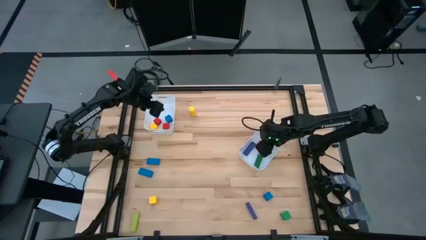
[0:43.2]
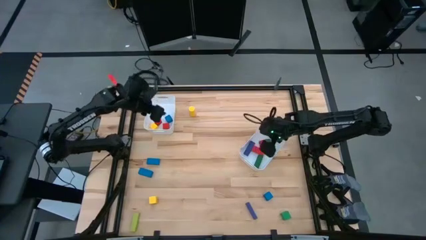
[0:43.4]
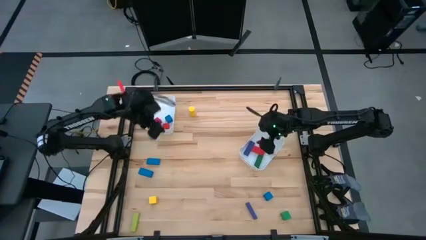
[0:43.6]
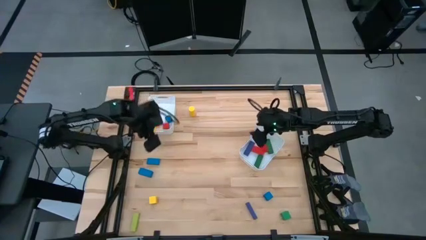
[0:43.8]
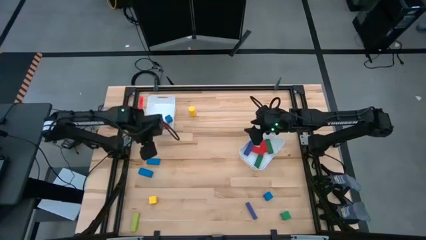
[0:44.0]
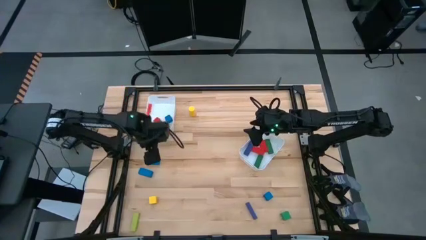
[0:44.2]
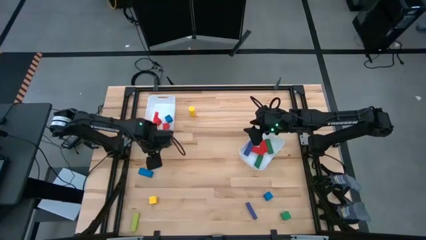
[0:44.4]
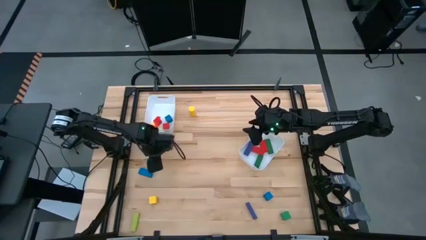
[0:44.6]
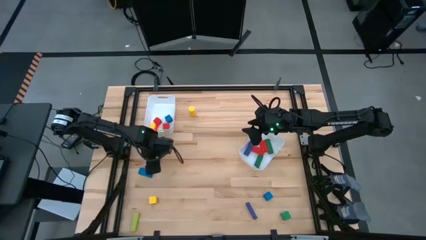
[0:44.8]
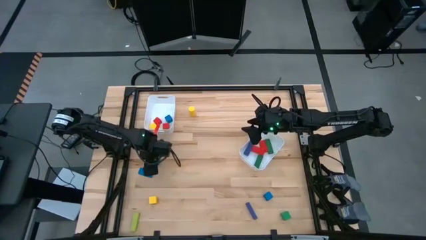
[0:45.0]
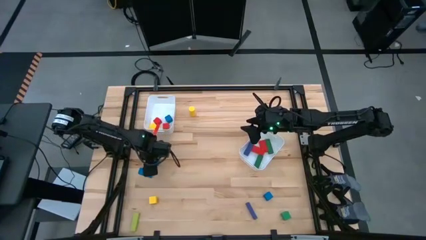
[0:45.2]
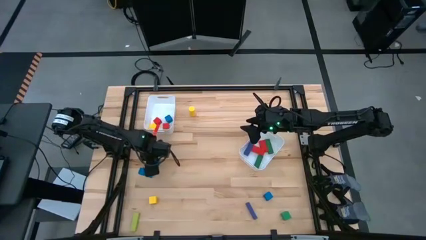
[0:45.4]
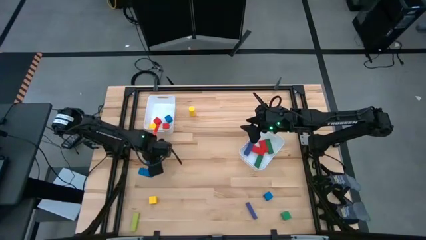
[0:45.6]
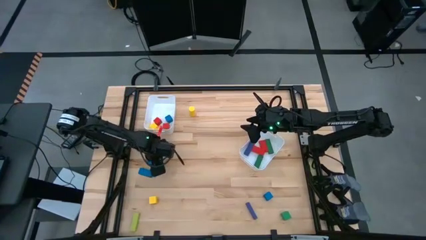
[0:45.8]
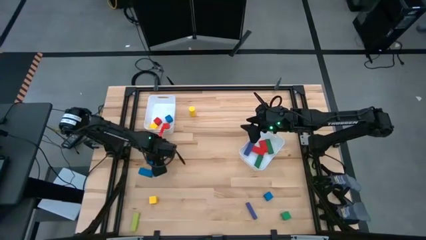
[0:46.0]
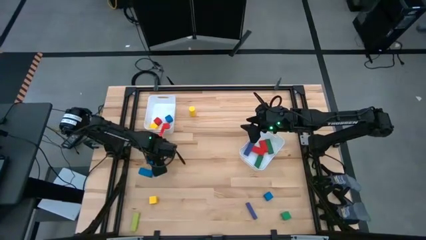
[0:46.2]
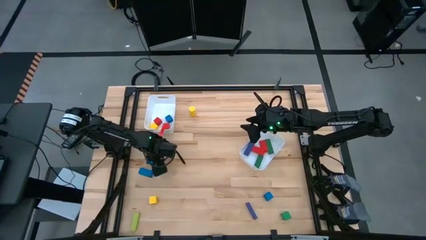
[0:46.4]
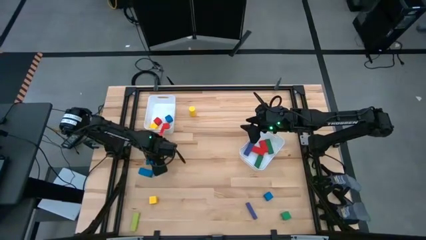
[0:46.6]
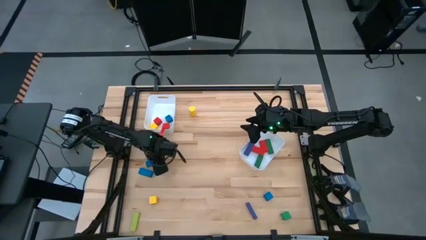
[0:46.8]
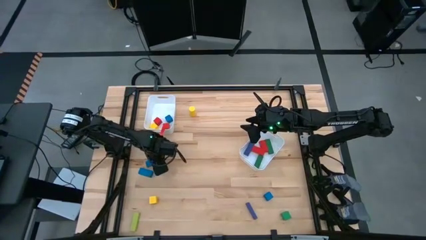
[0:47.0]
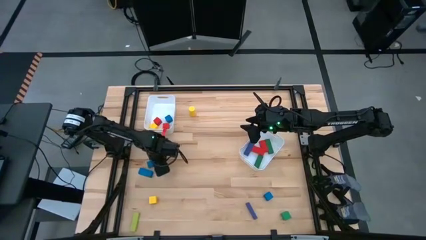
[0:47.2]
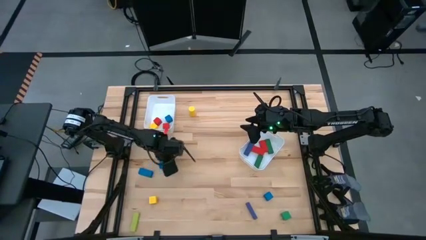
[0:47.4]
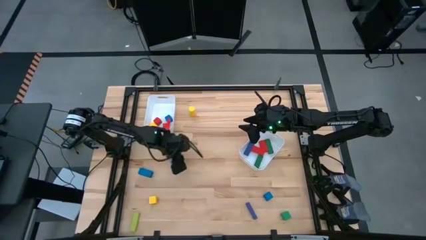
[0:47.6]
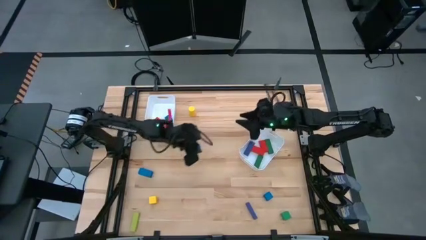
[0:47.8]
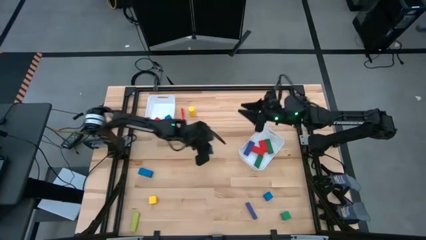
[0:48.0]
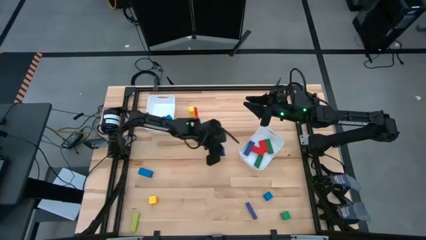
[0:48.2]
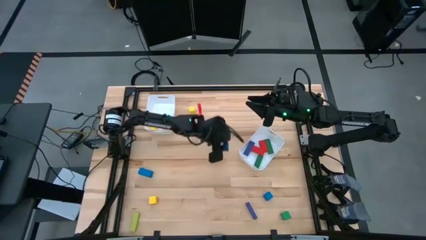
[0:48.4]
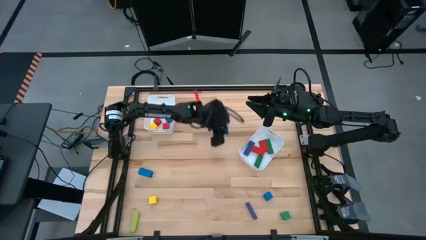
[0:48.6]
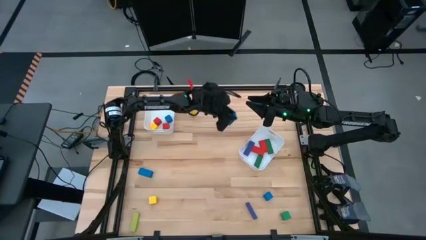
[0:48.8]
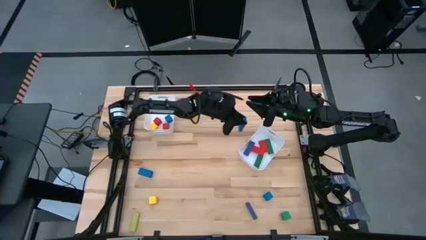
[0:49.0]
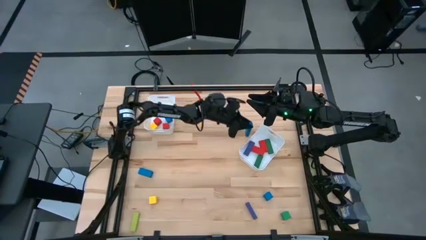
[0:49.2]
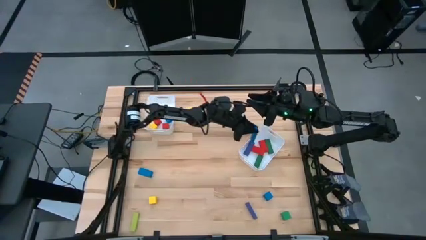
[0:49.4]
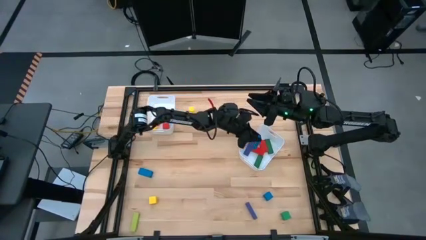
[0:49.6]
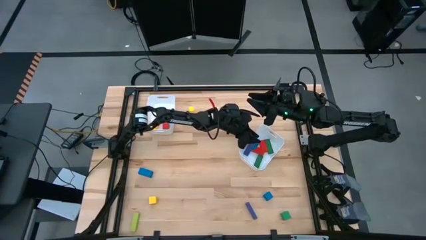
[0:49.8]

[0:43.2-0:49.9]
Task: Sort blocks by size
Put the top blue rectangle block into the right white bin

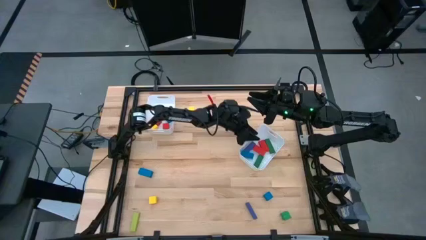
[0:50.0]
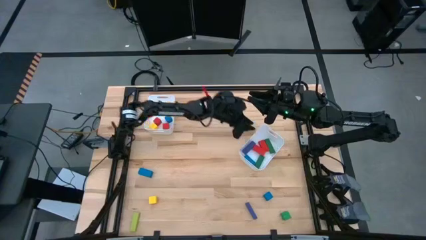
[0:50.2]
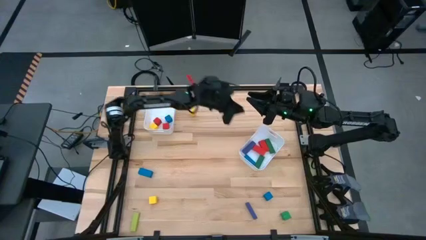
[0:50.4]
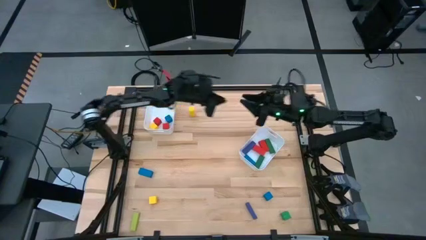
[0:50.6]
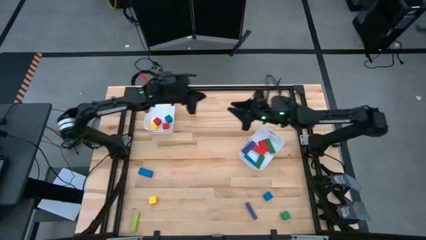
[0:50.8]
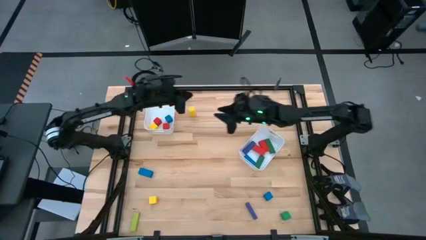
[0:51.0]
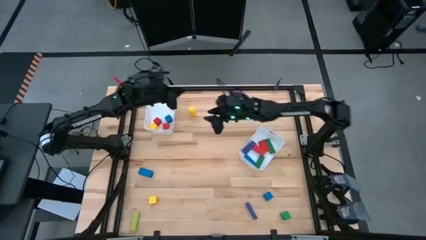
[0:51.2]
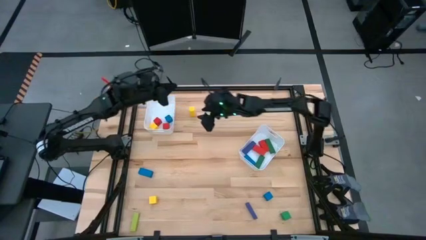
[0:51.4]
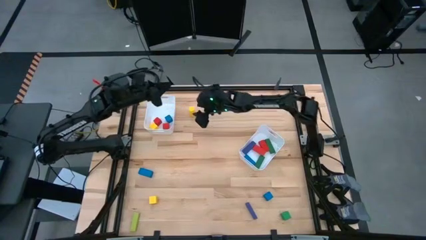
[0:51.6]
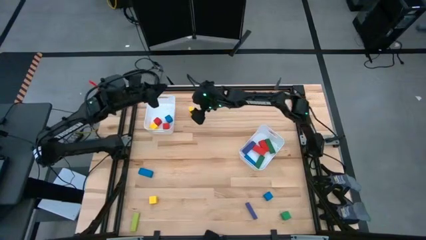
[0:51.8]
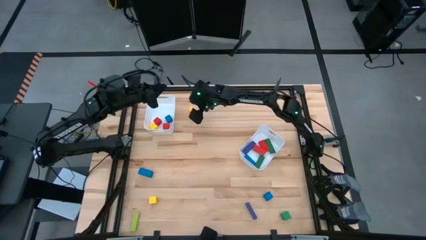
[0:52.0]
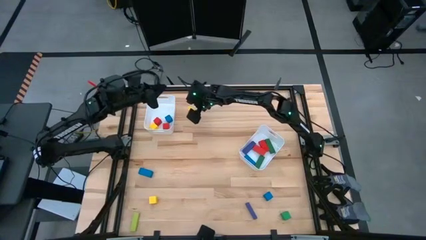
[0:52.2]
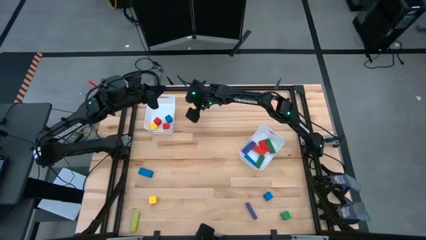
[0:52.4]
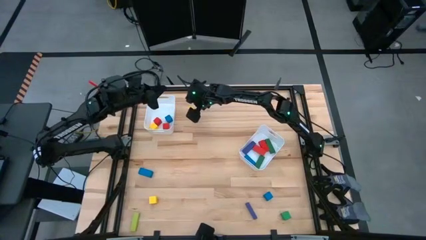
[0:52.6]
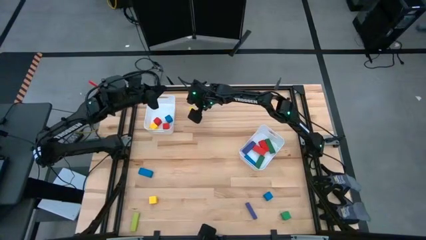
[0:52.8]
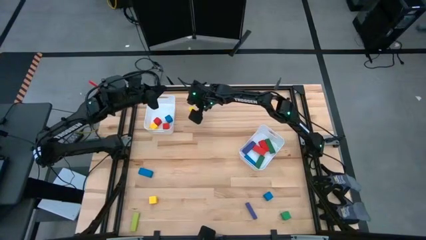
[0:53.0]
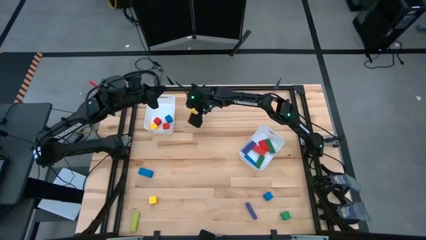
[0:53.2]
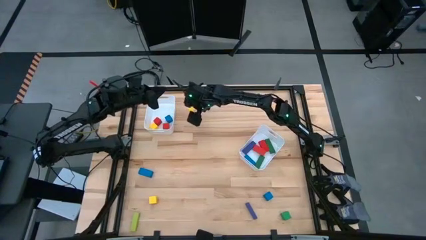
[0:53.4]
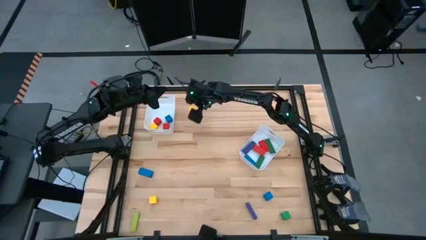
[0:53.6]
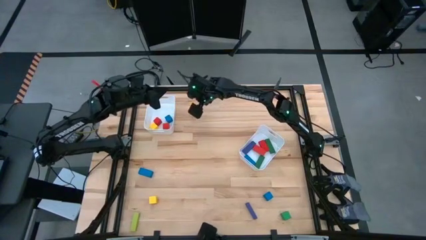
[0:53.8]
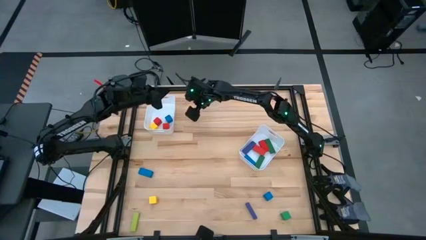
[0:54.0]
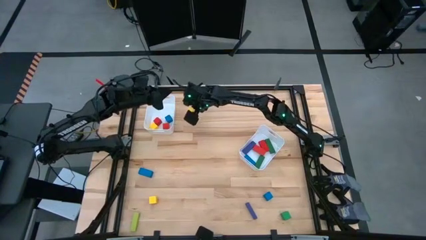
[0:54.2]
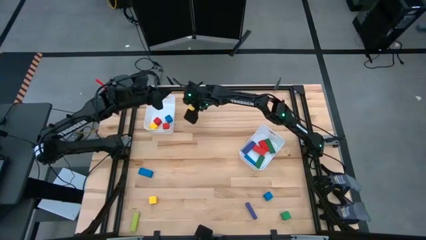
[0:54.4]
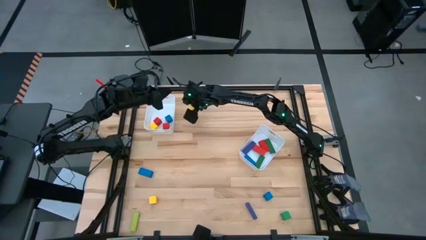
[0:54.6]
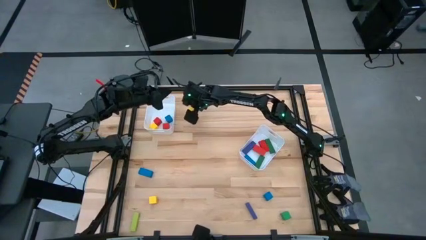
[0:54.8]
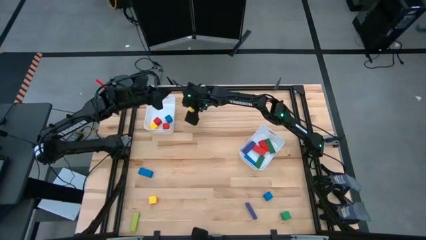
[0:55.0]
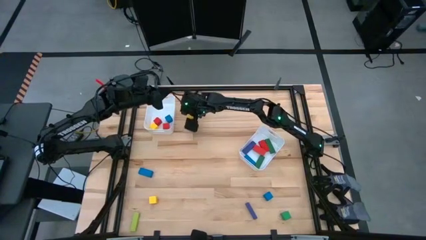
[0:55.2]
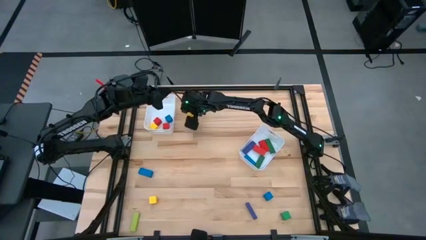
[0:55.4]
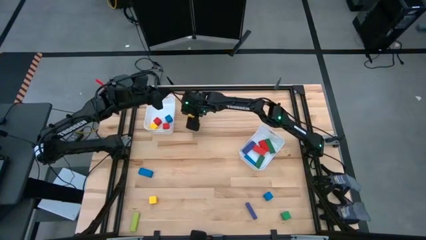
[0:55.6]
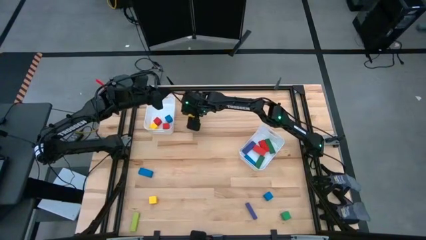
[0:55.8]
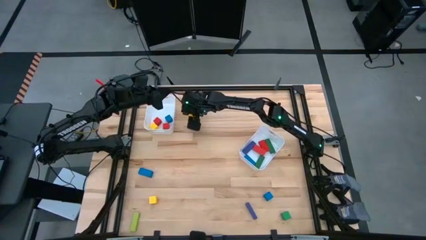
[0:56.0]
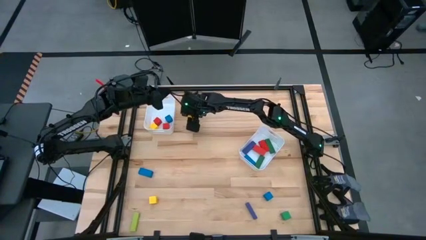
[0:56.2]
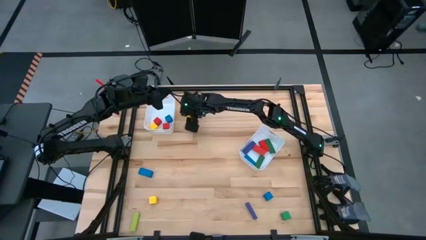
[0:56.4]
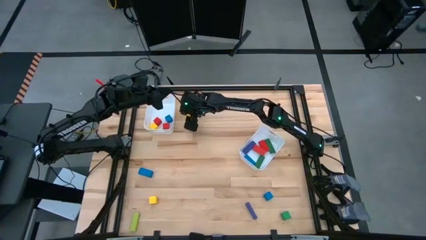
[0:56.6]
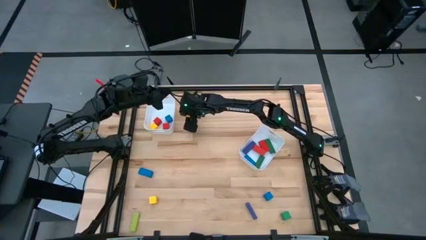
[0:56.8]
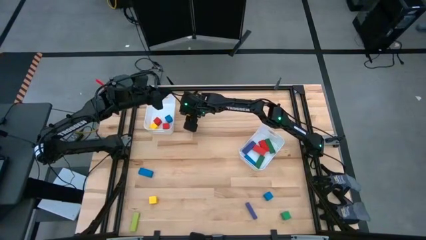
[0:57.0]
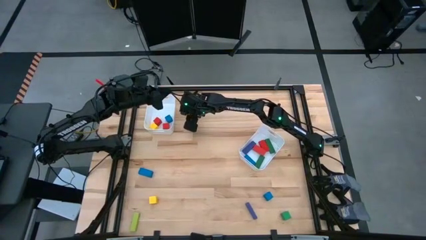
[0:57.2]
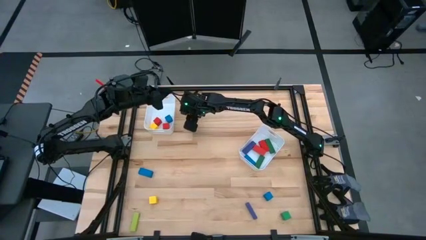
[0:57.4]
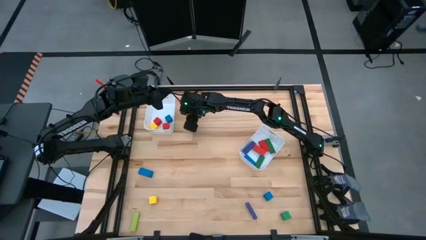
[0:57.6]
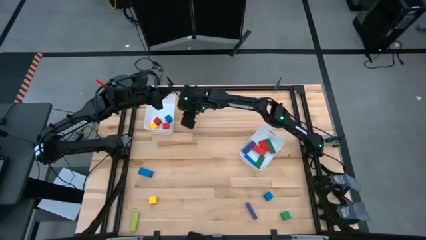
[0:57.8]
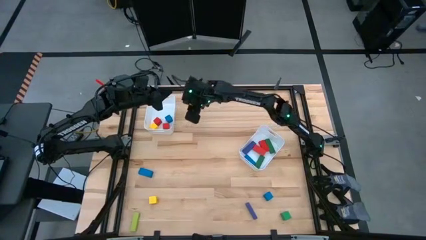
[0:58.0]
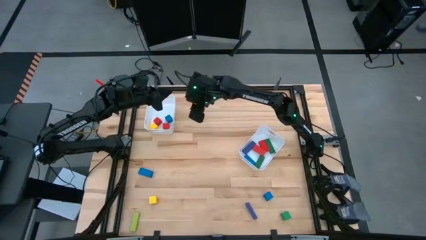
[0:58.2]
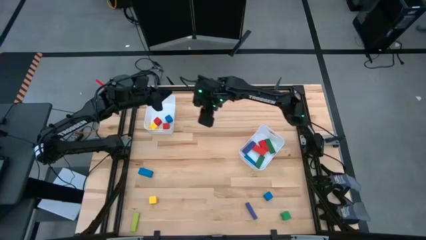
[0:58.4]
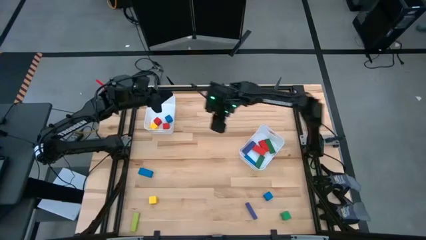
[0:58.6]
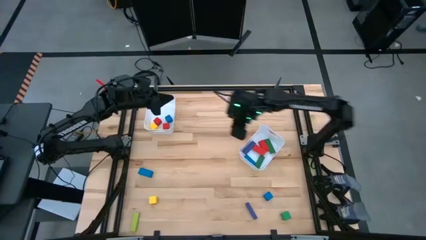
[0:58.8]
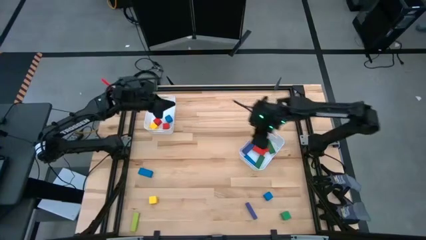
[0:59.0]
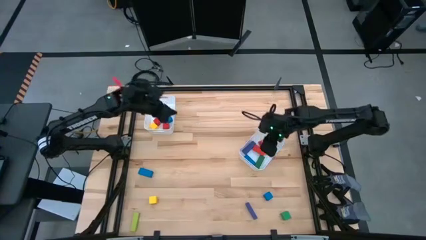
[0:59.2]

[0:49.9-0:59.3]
Put the yellow cylindrical block into the right white bin

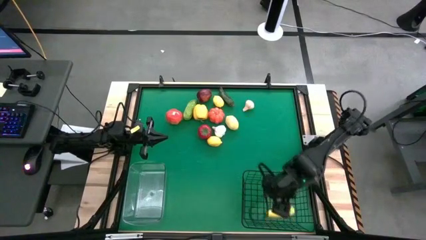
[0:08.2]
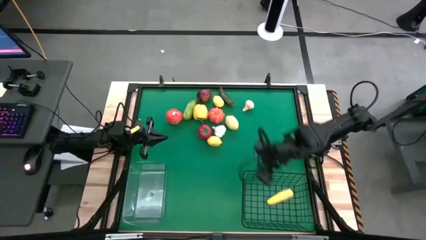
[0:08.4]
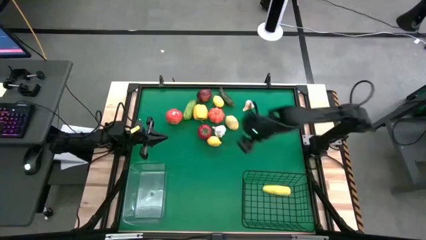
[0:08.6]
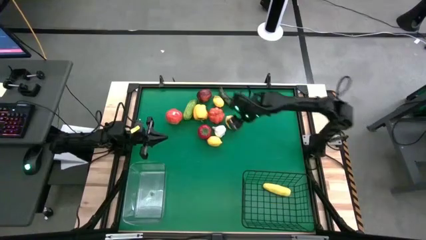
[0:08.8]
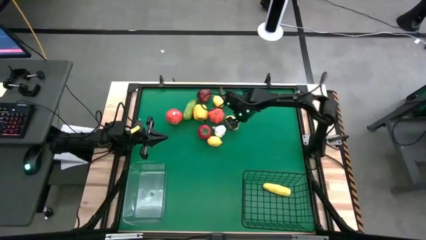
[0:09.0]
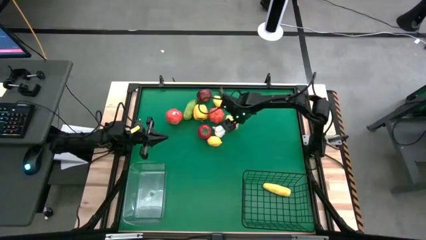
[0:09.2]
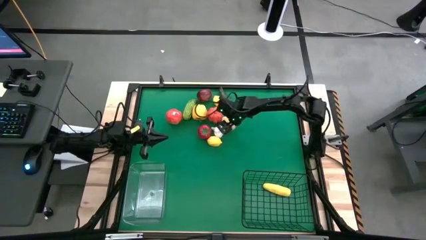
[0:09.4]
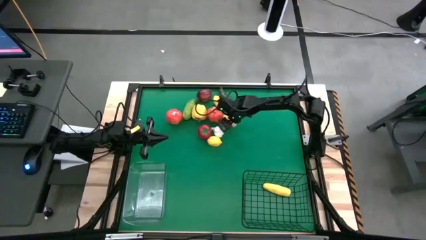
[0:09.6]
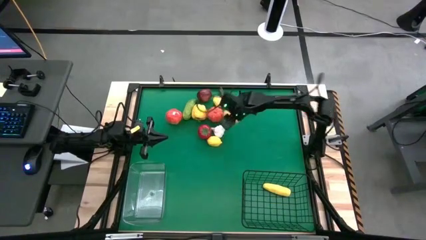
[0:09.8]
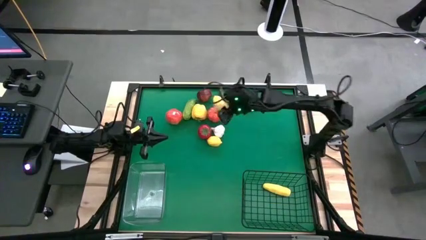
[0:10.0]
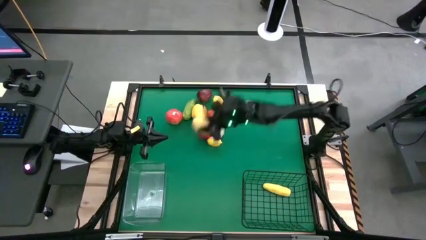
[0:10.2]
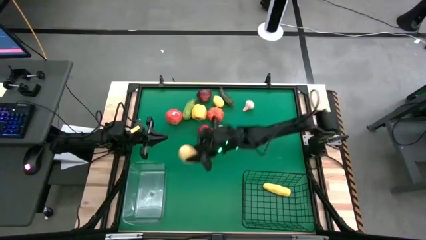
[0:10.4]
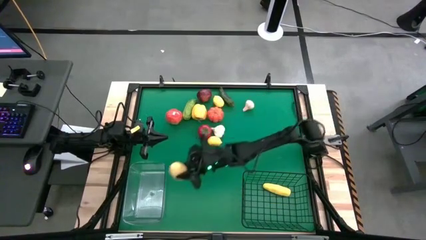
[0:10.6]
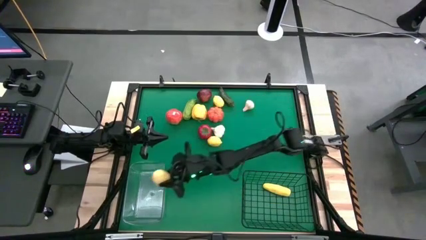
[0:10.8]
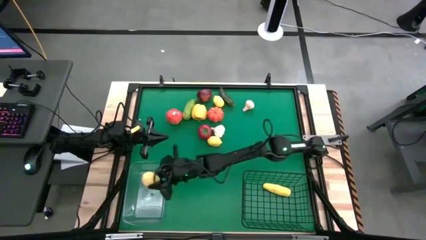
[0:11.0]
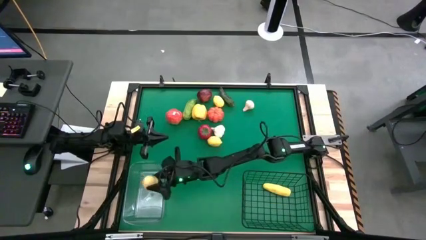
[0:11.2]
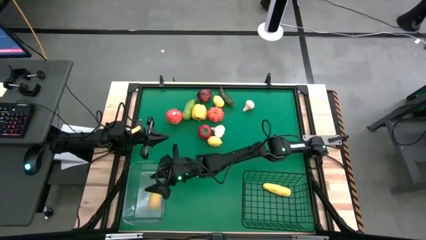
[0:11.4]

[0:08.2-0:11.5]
Task: Sort produce into baskets
Put the middle lemon into the transparent bin
